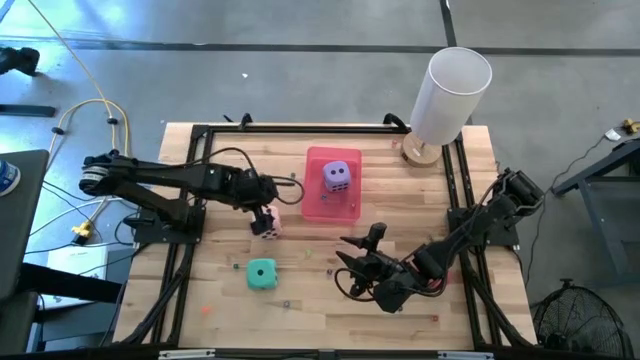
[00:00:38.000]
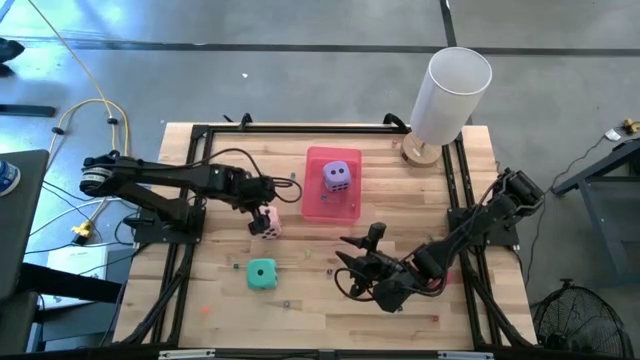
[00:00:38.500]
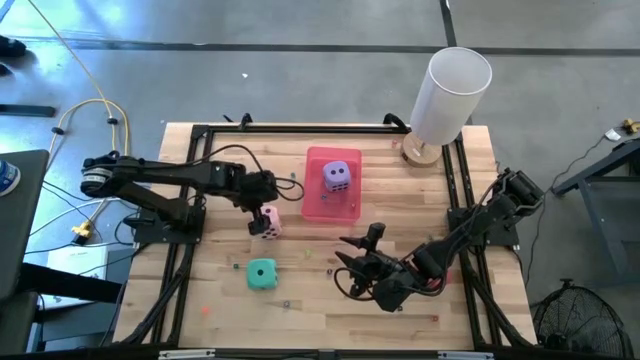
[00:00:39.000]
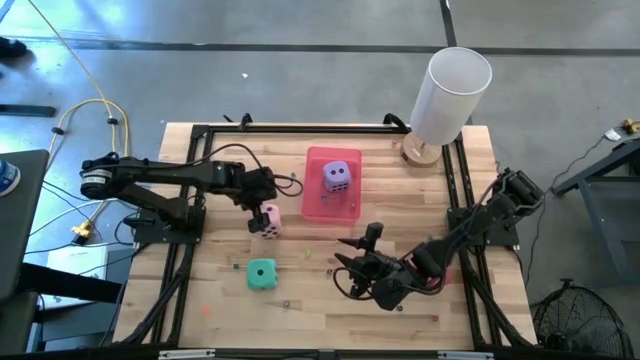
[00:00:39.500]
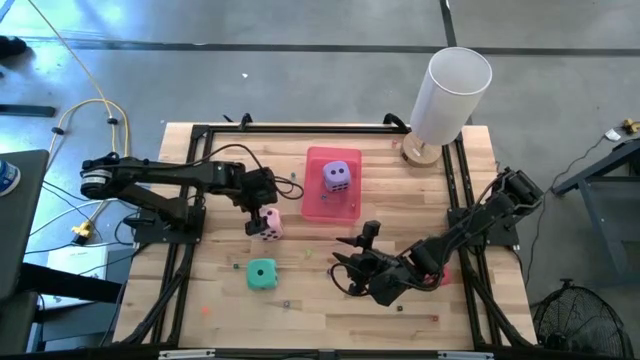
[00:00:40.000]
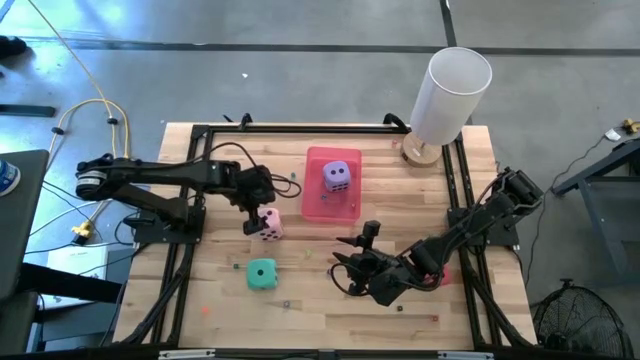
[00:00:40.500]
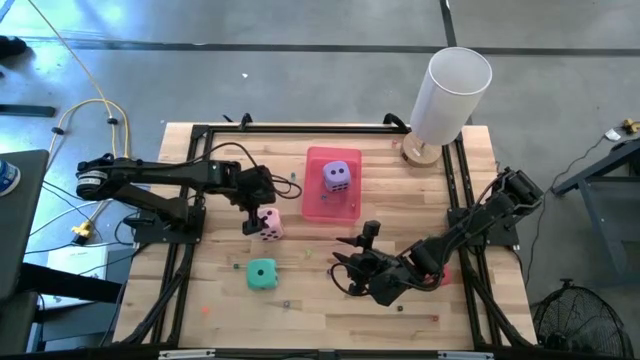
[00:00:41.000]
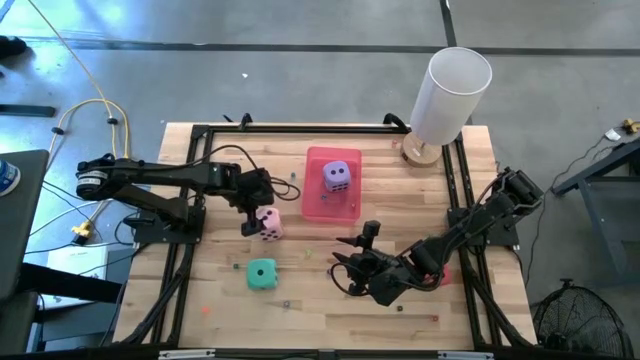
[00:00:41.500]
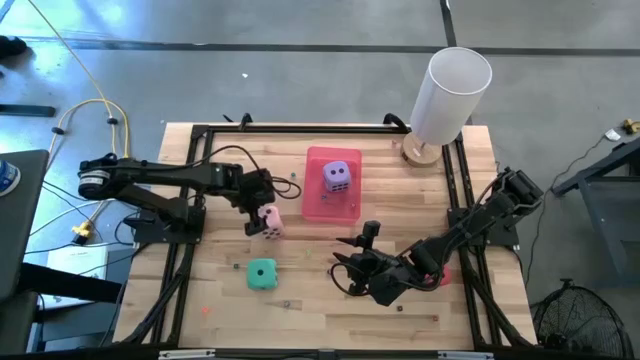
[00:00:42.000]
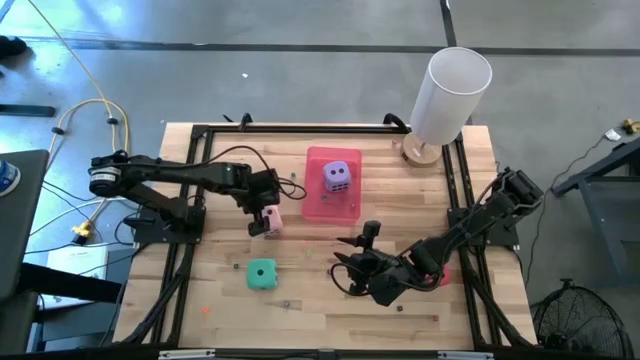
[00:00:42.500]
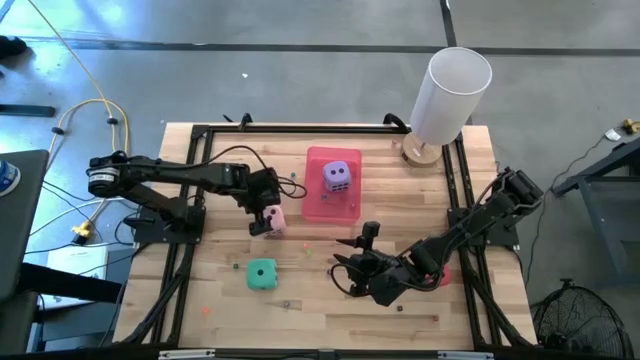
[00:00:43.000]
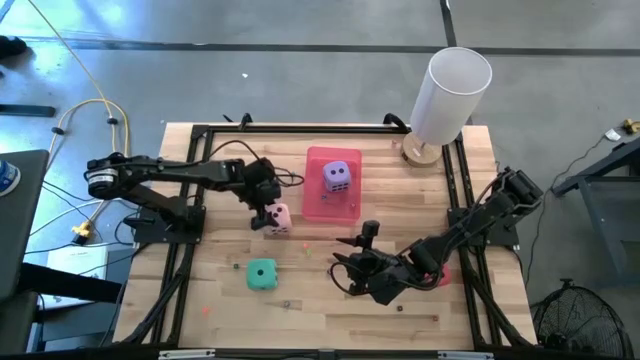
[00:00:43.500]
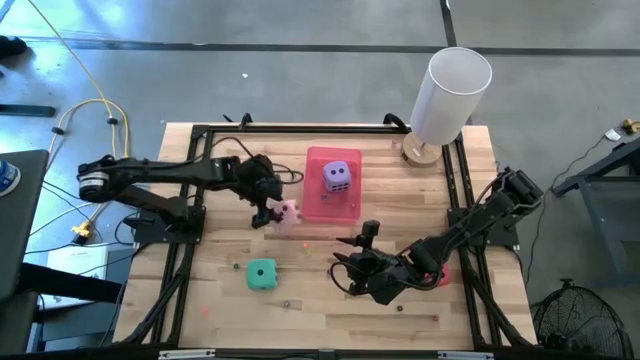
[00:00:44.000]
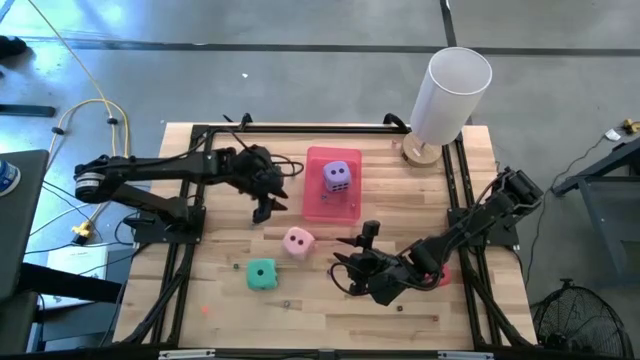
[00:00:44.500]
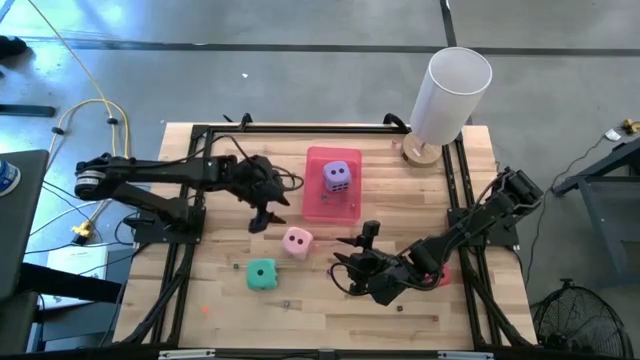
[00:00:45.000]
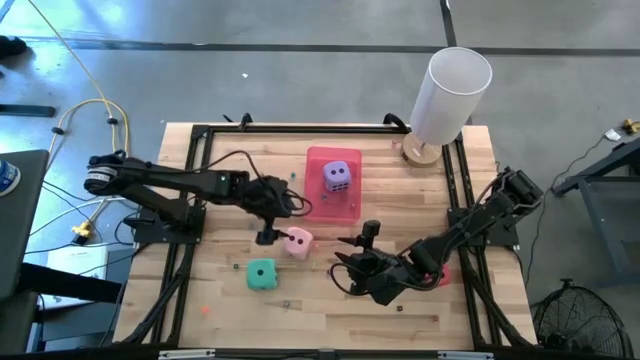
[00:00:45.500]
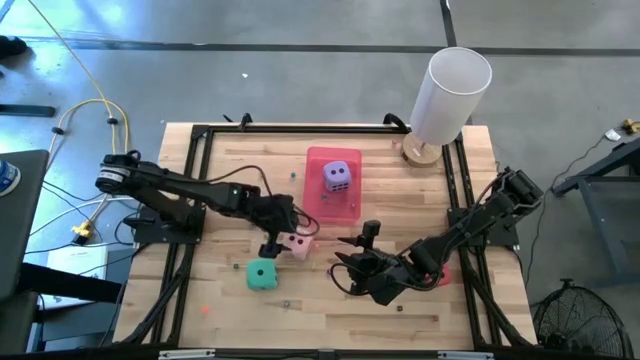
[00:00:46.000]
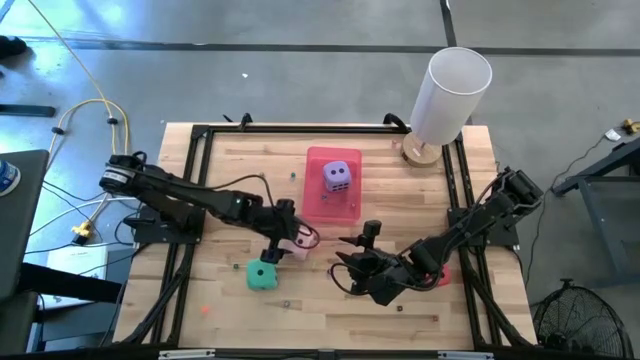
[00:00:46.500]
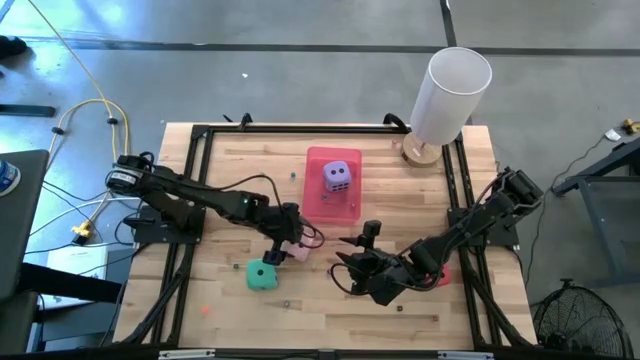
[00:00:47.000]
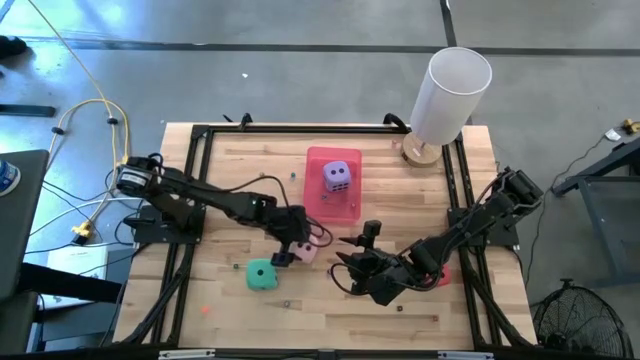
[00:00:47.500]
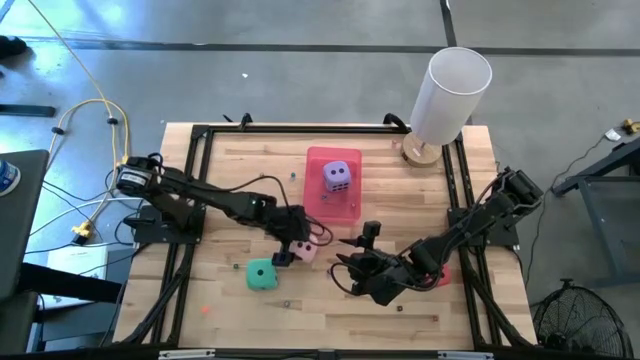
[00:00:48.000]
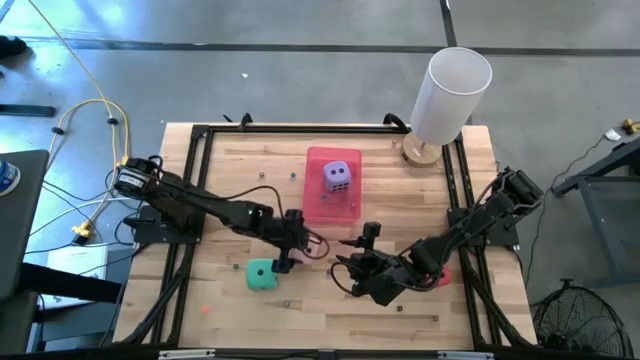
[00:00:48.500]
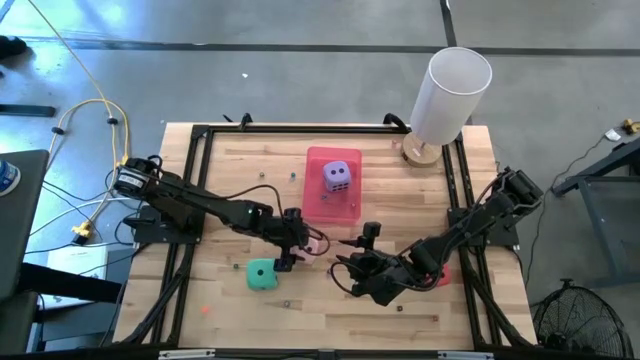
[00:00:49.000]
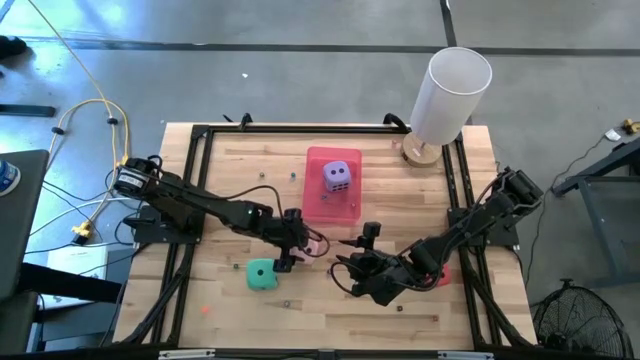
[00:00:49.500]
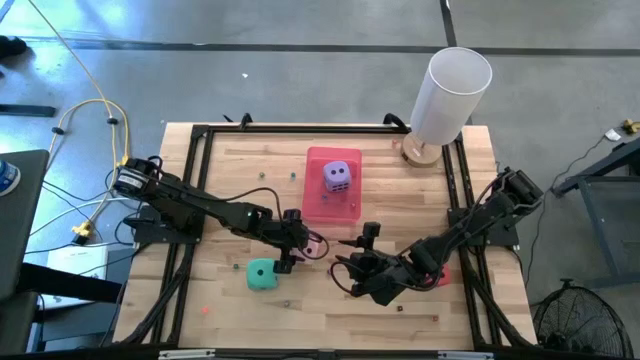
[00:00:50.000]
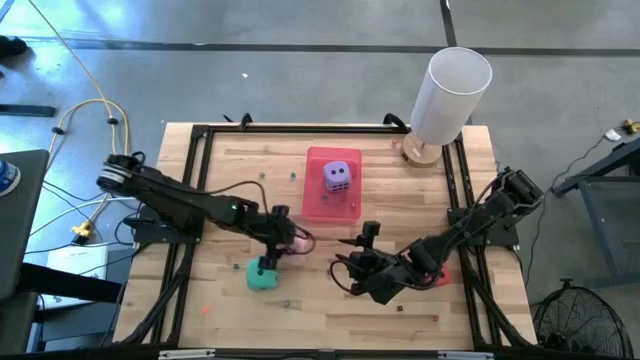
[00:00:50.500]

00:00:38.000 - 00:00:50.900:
Task: Pick & Place Dice
Put the large pink die into the red bin

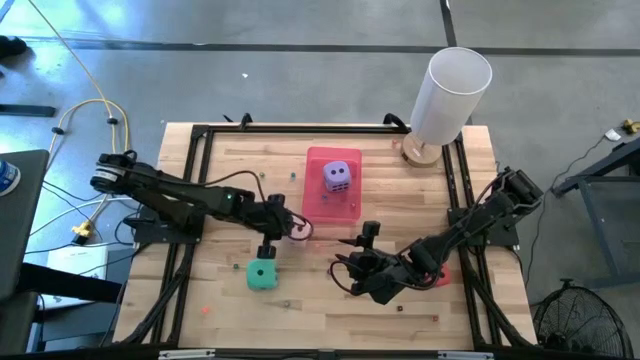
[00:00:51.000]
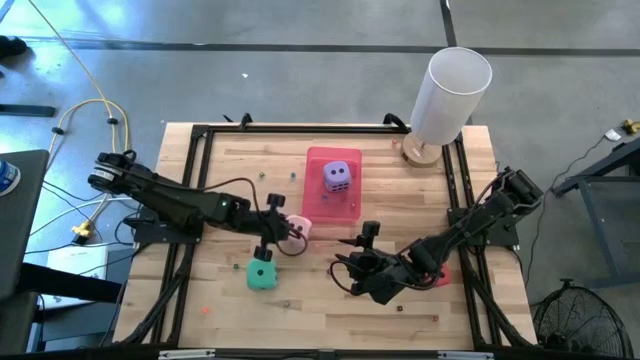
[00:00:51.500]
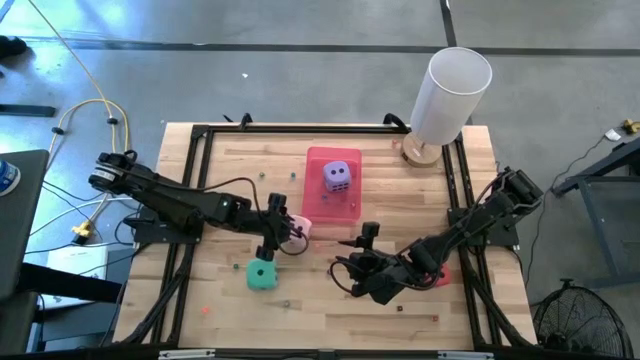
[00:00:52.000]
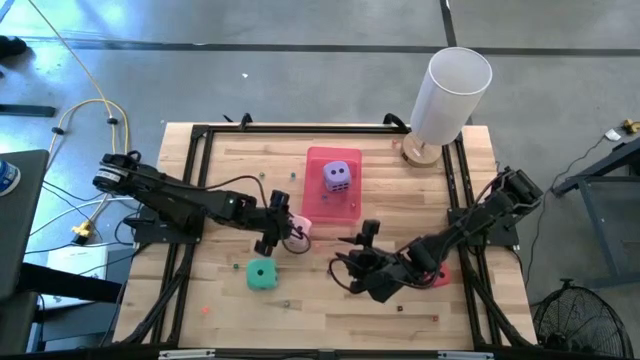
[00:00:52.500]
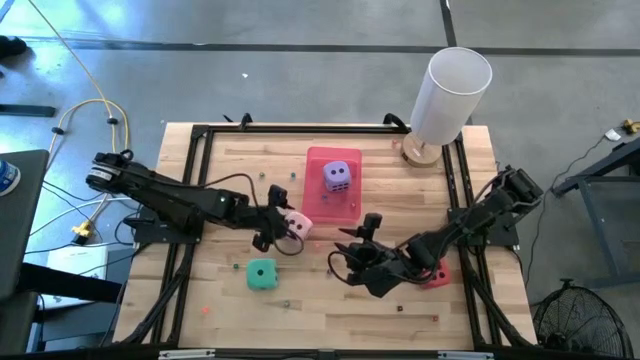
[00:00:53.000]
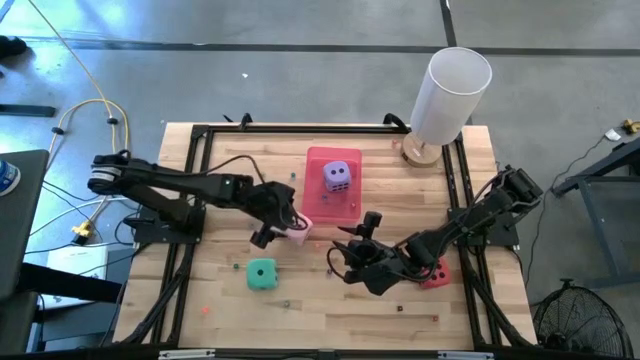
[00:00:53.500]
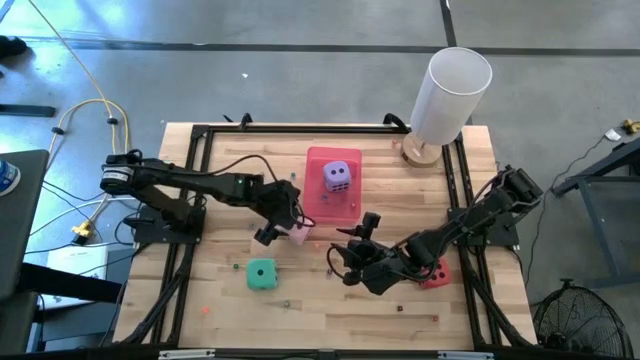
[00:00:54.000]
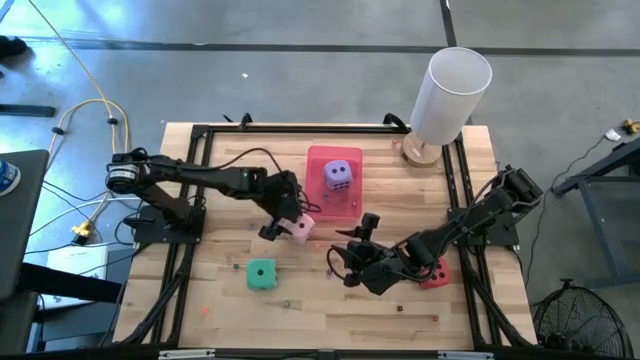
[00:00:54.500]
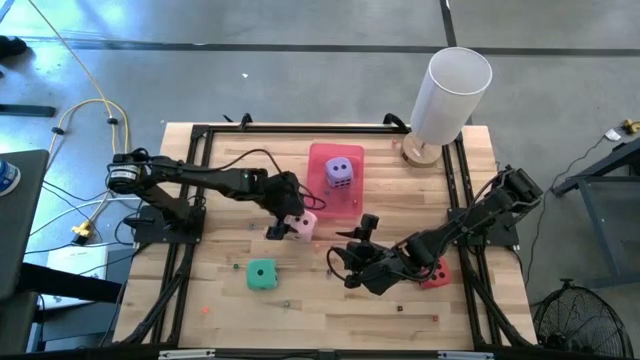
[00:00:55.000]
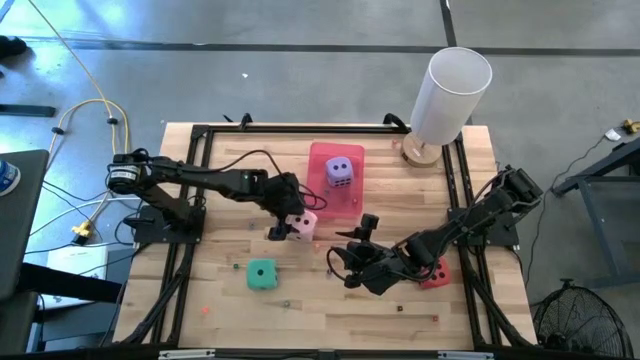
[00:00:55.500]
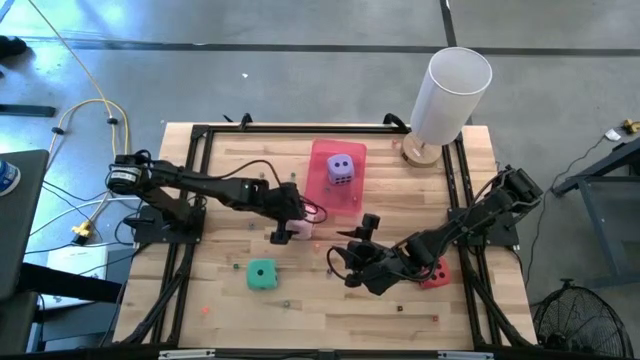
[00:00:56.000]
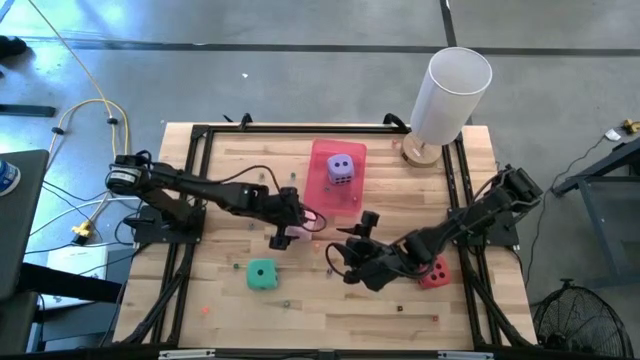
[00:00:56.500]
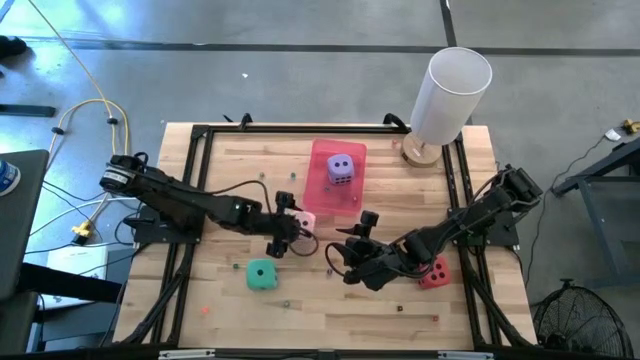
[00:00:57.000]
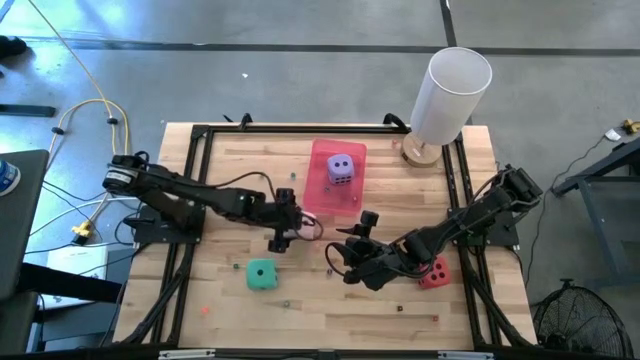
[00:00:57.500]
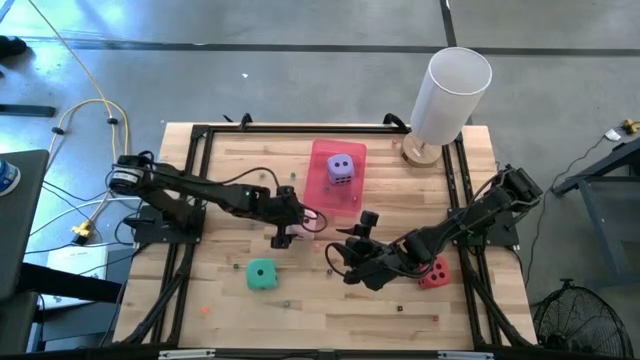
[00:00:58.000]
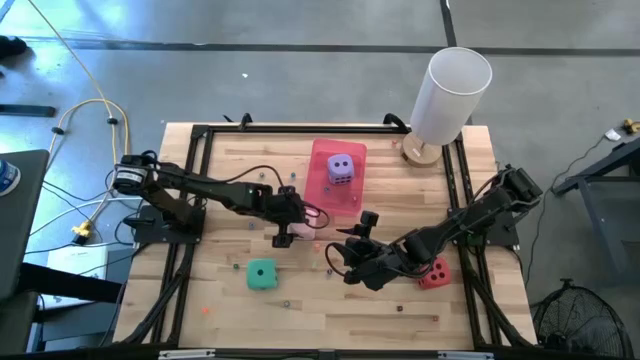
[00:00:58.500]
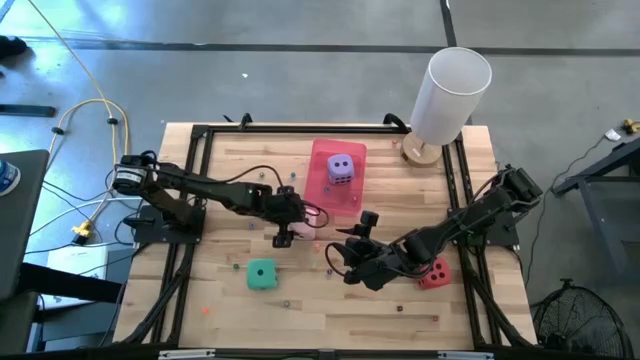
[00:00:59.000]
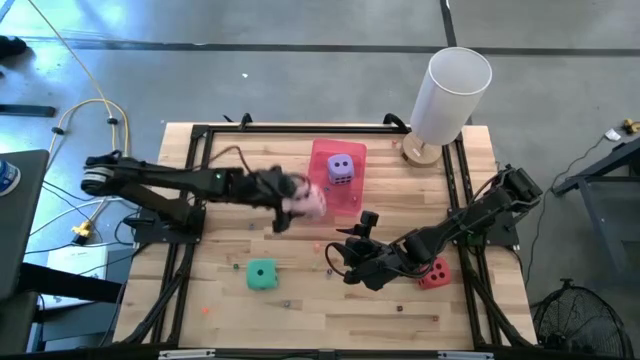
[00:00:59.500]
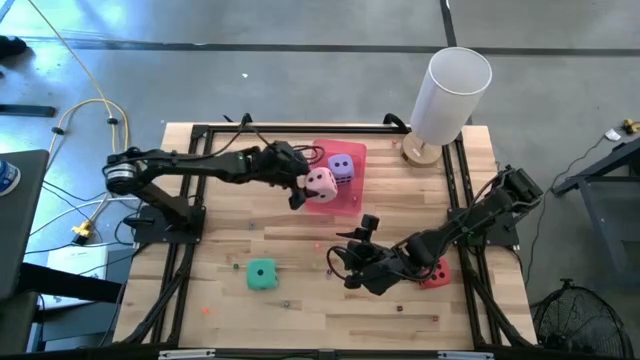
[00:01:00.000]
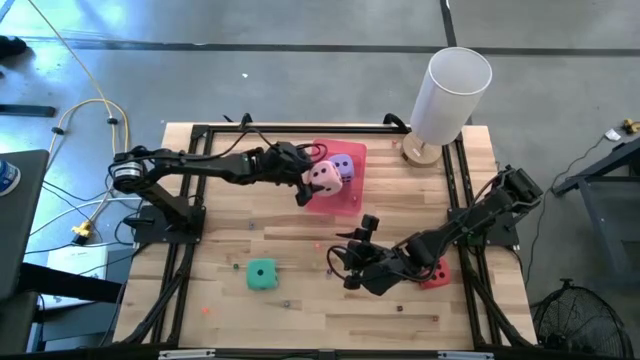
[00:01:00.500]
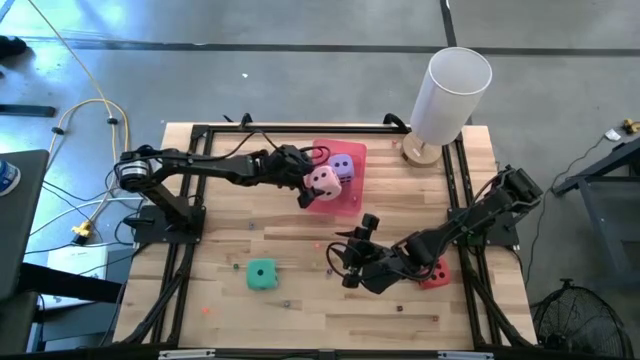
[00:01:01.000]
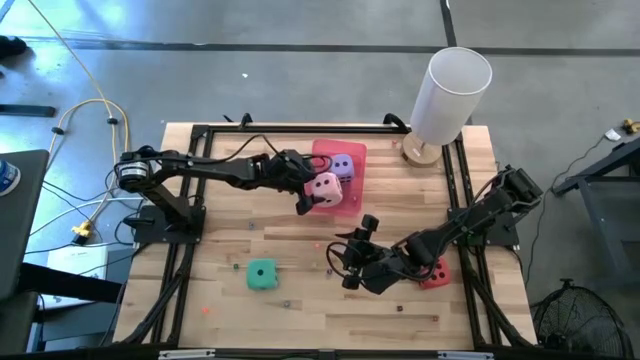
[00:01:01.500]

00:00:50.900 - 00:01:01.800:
Put the large pink die into the red bin
